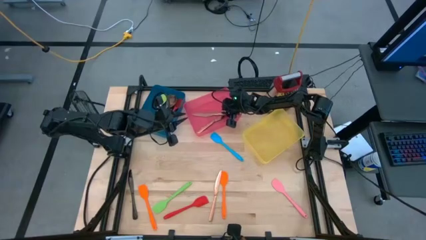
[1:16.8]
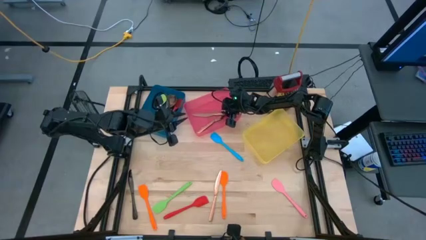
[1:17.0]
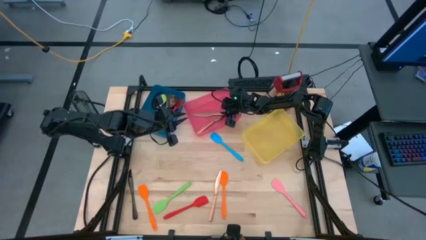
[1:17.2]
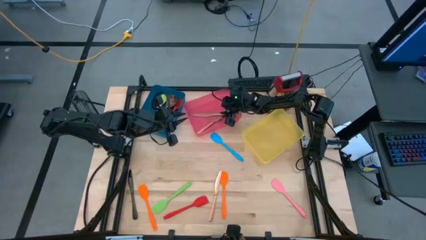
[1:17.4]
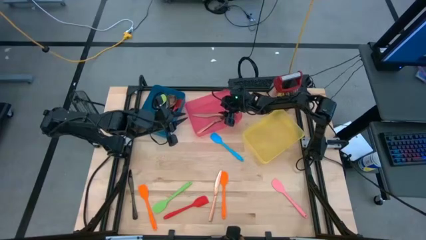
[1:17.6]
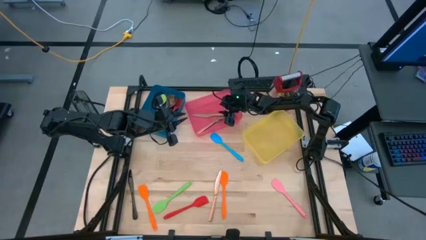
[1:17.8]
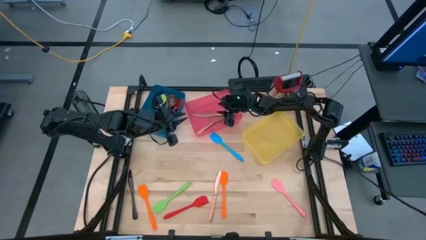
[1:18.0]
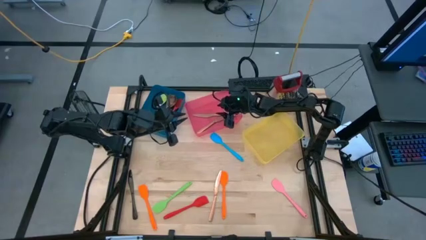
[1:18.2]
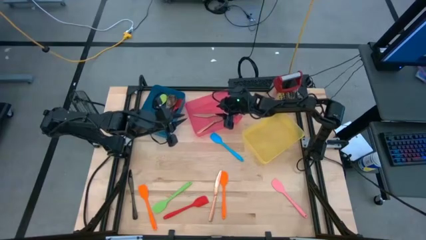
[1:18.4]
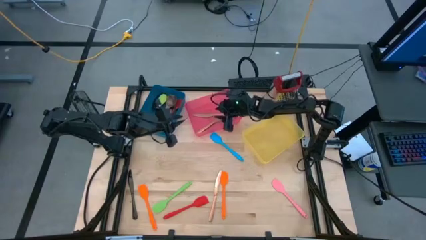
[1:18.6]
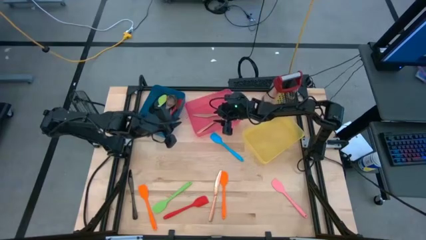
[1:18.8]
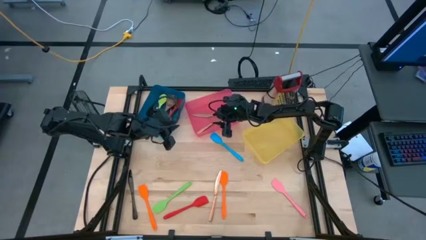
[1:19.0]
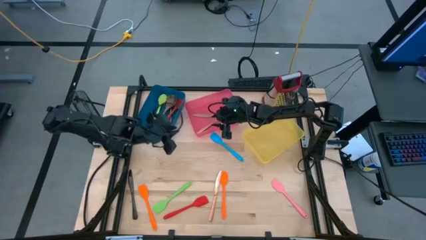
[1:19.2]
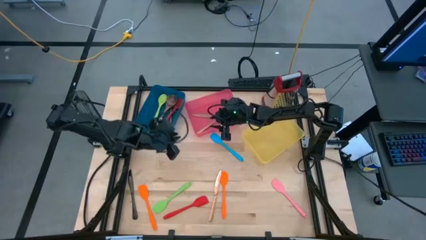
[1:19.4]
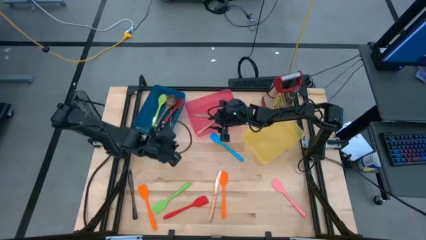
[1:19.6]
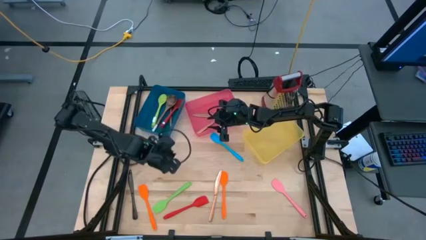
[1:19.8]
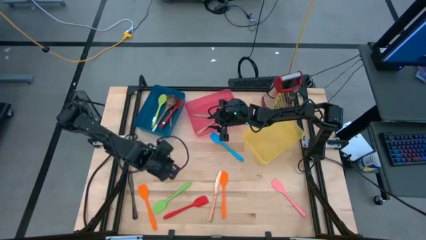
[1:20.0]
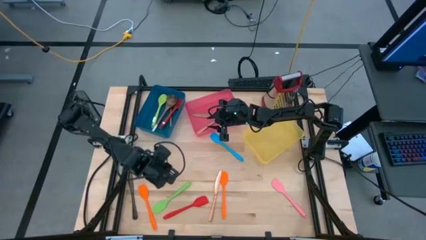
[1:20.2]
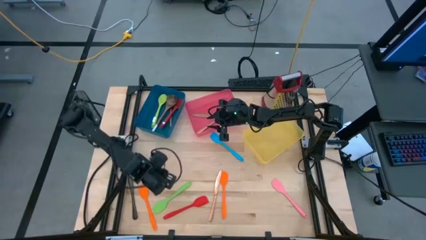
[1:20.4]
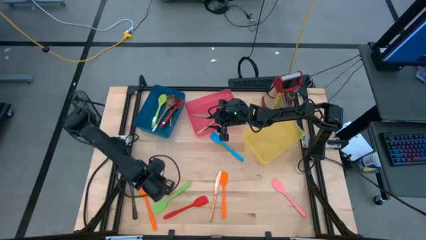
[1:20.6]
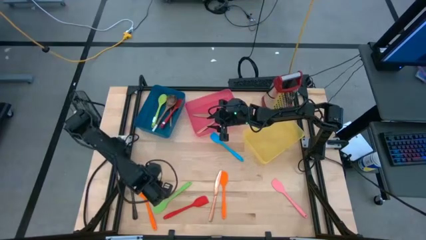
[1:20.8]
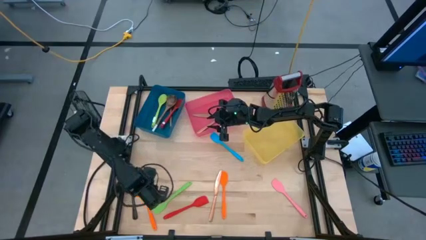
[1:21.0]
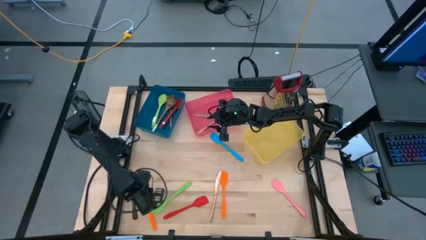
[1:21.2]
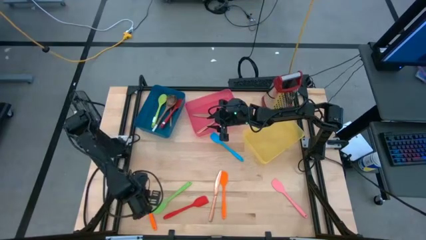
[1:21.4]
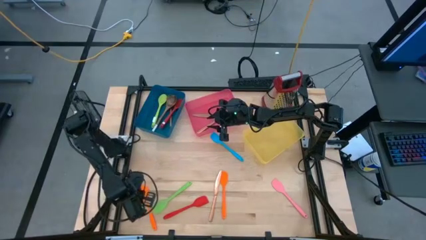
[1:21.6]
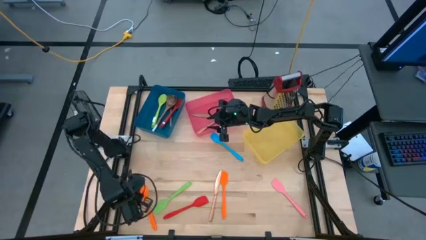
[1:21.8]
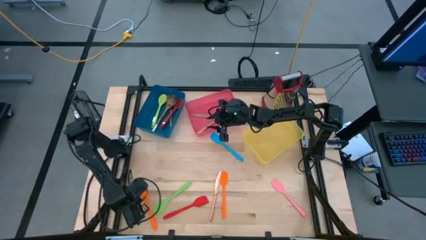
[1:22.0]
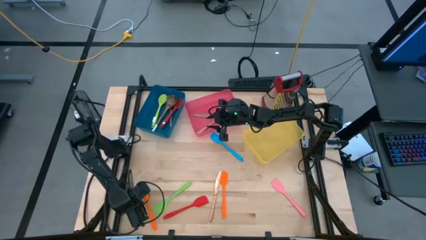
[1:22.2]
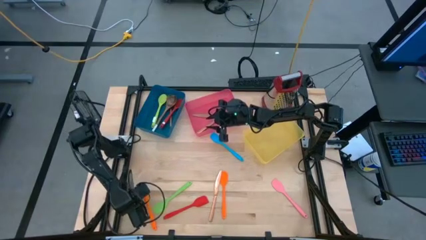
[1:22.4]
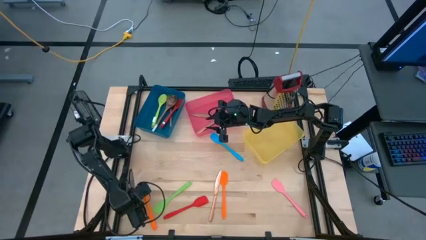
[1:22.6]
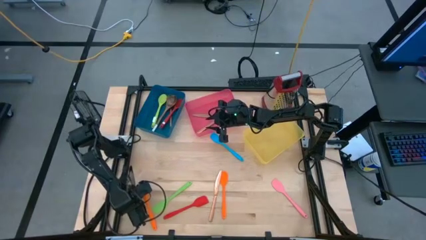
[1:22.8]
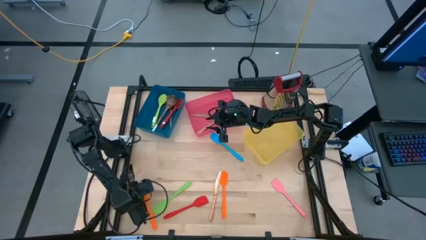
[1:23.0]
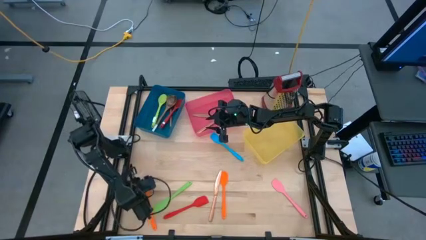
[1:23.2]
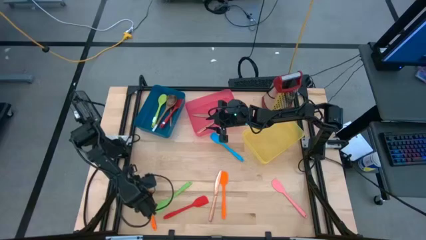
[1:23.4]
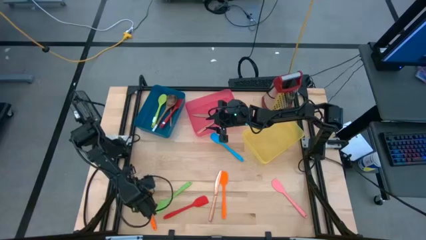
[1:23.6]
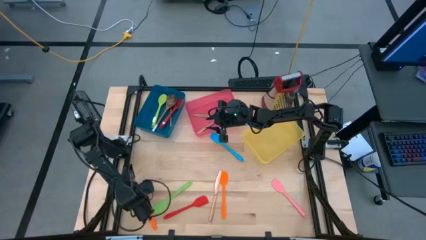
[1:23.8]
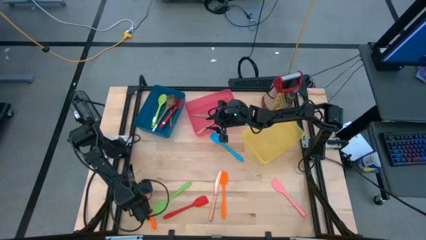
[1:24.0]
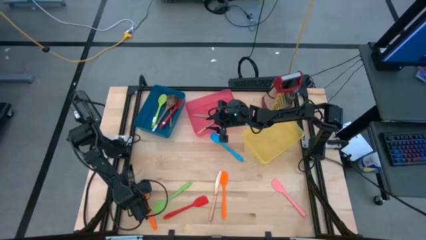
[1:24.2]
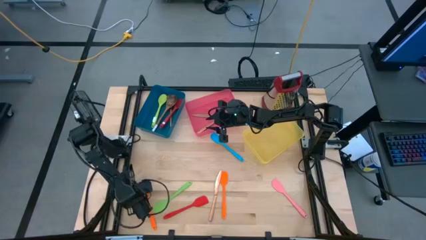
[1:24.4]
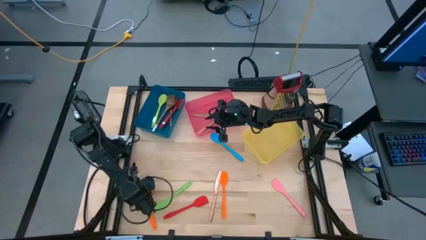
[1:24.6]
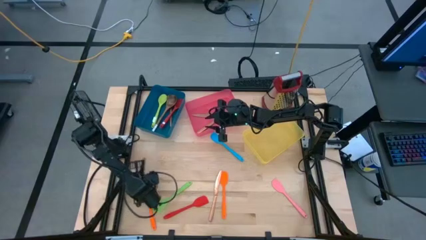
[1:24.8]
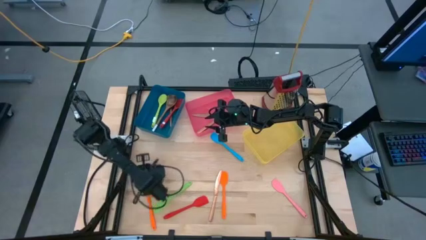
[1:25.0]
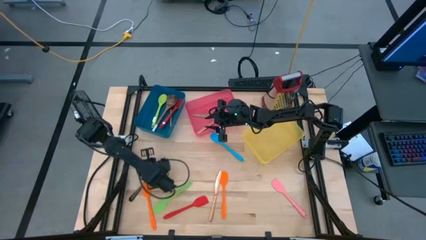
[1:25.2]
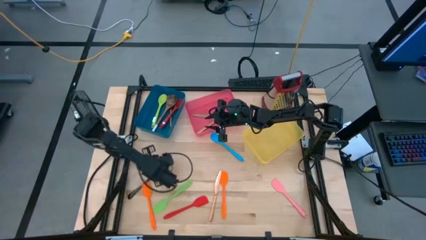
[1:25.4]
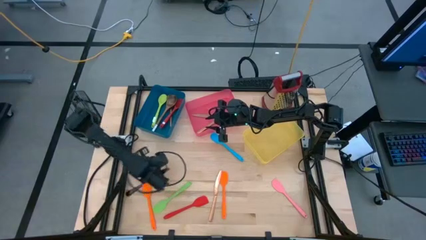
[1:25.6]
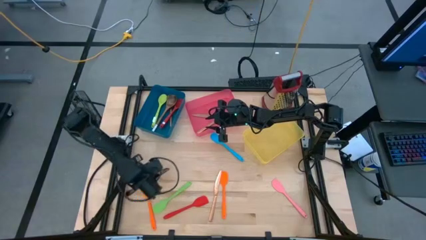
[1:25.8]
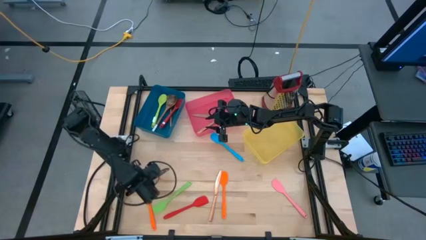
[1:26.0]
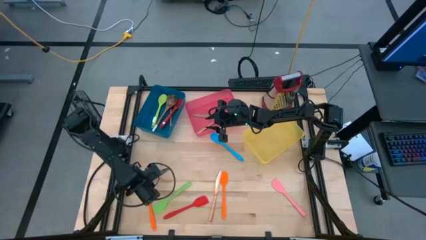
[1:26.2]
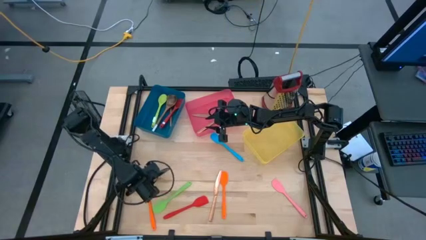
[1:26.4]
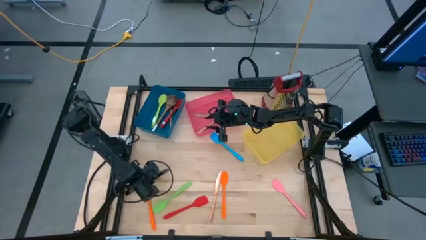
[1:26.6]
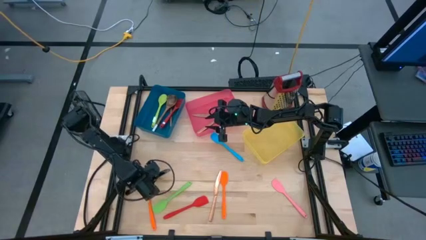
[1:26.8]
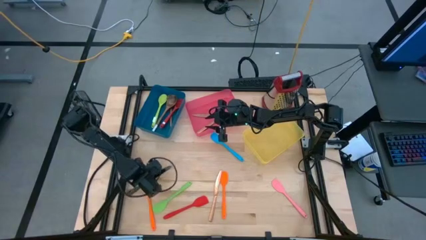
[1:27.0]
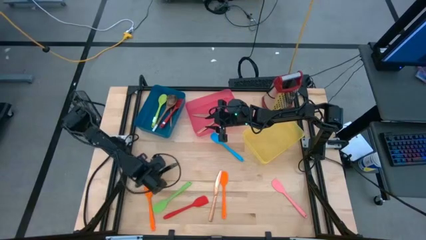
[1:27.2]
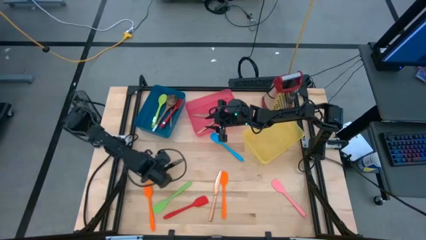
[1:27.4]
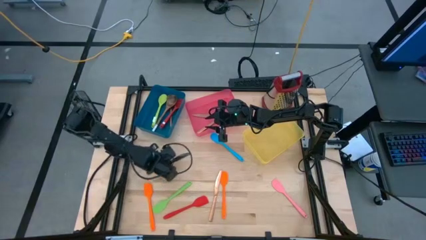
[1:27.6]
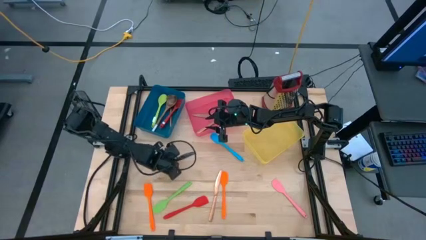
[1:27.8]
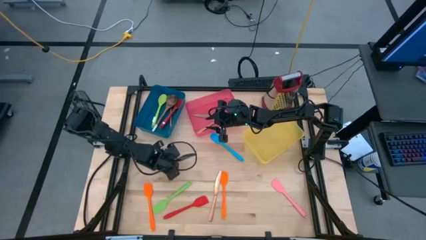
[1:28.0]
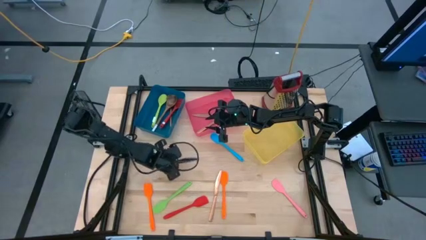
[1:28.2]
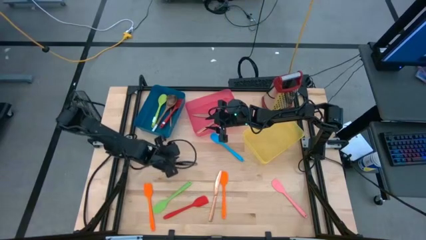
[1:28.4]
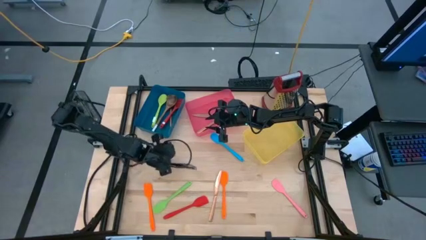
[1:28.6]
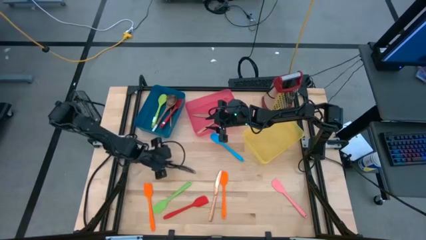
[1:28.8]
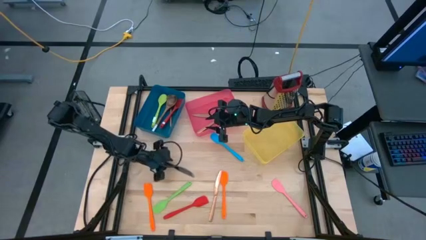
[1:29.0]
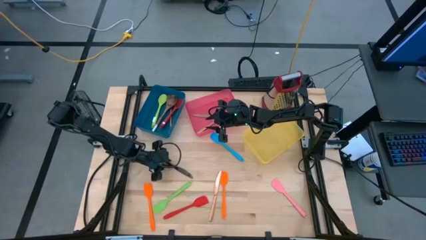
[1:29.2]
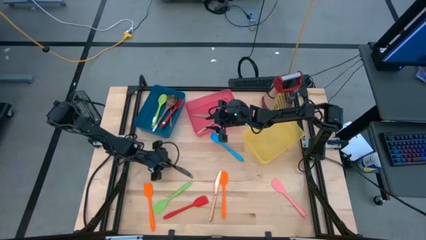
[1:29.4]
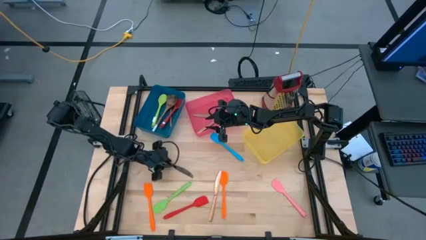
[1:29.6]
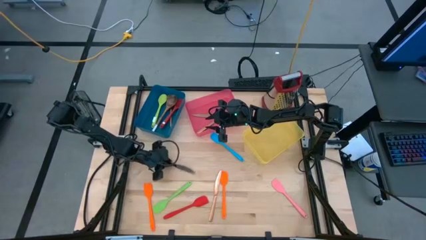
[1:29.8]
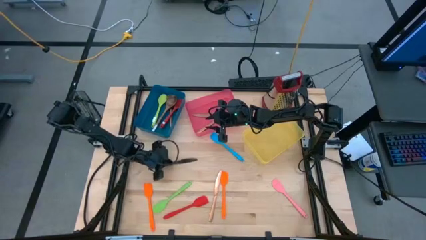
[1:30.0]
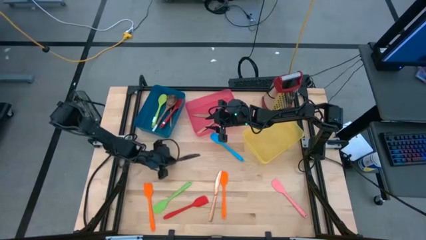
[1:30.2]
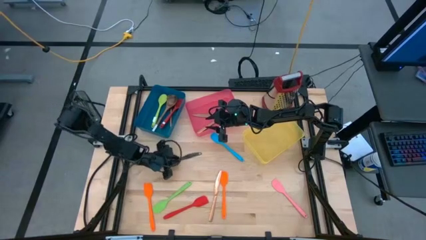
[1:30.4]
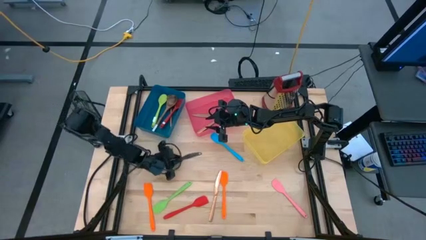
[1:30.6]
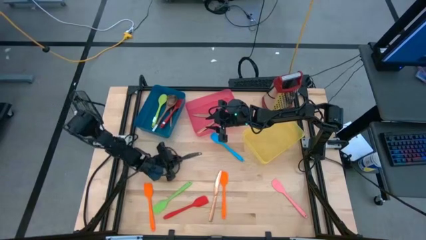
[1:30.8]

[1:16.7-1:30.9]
Task: Pick & Place Kitchen Items
Adjust the black knife
